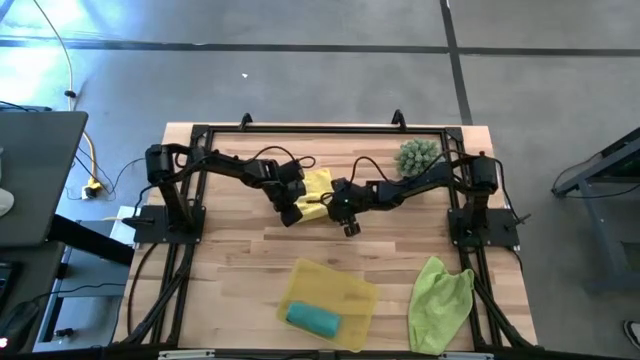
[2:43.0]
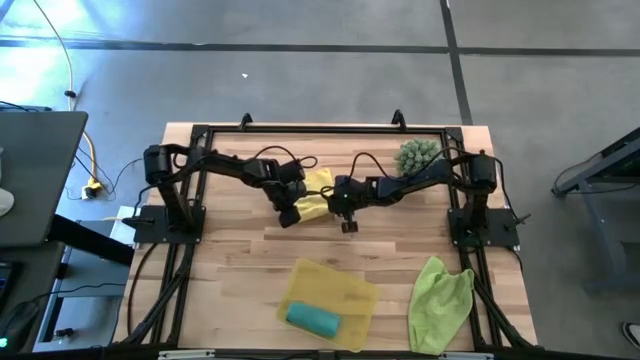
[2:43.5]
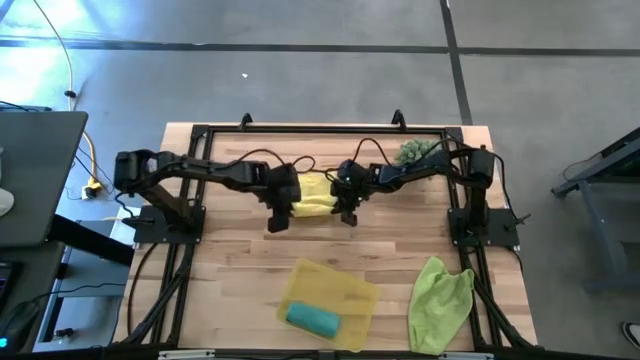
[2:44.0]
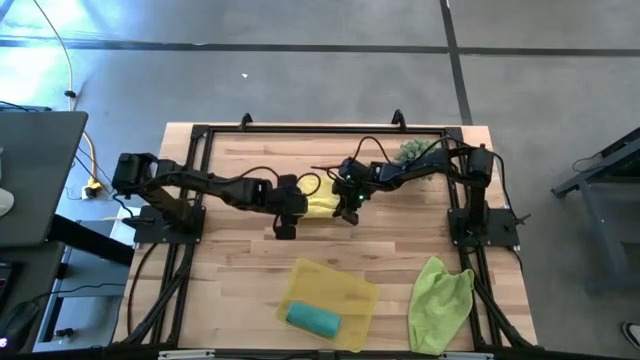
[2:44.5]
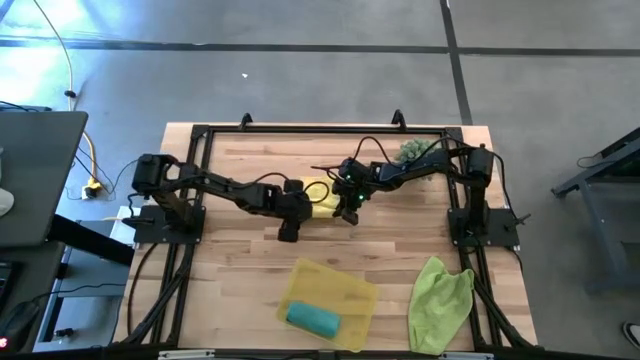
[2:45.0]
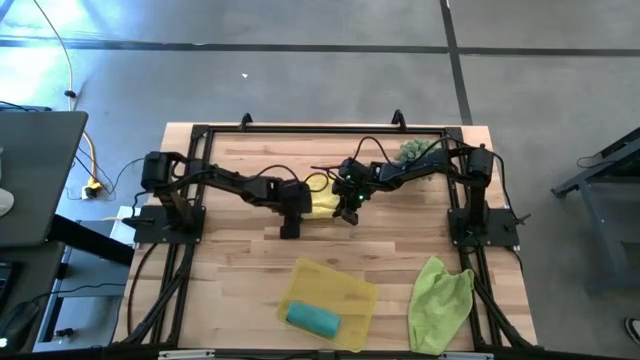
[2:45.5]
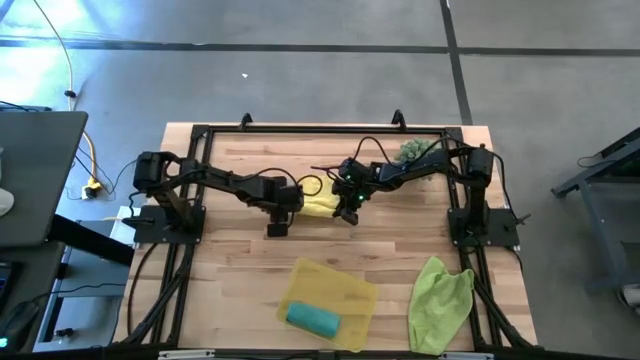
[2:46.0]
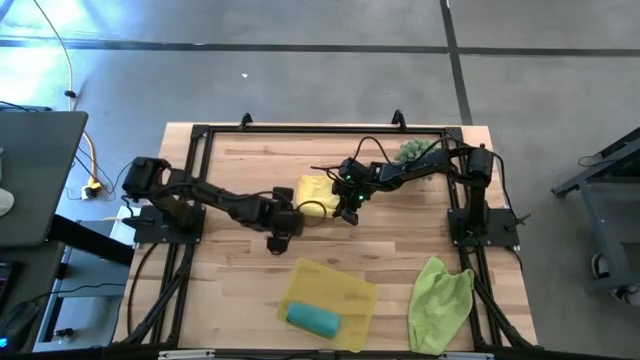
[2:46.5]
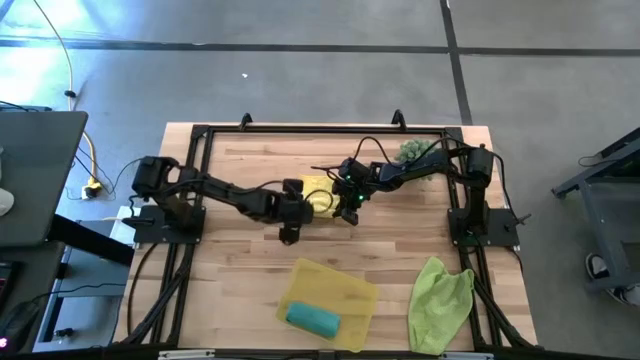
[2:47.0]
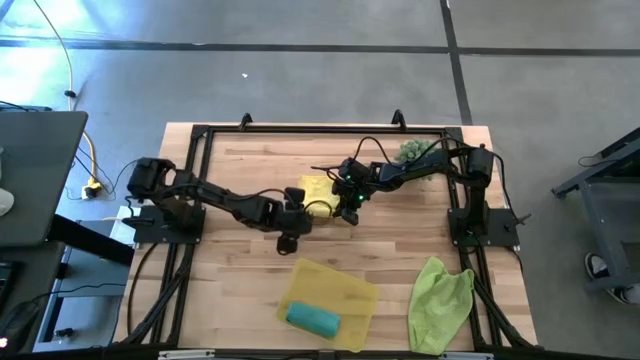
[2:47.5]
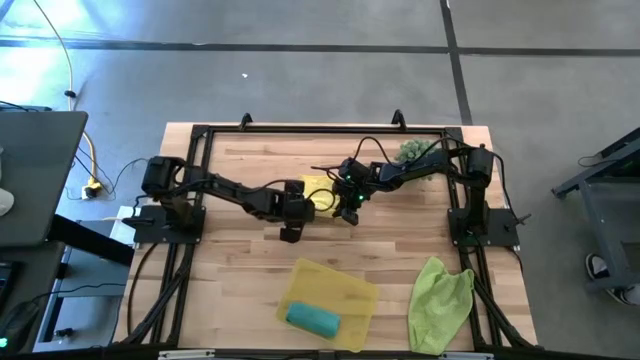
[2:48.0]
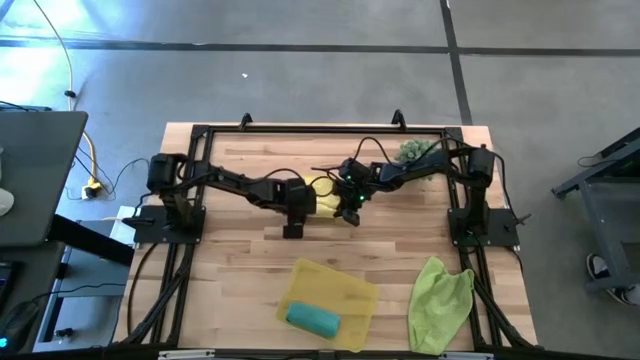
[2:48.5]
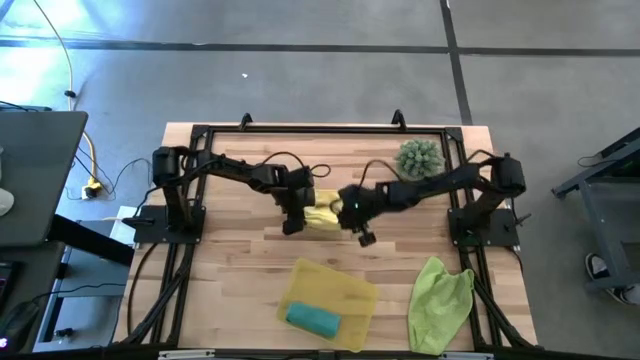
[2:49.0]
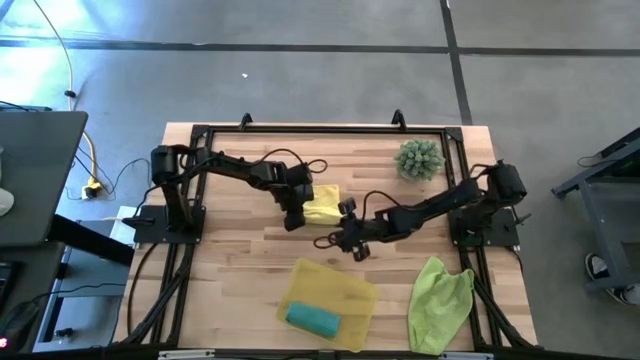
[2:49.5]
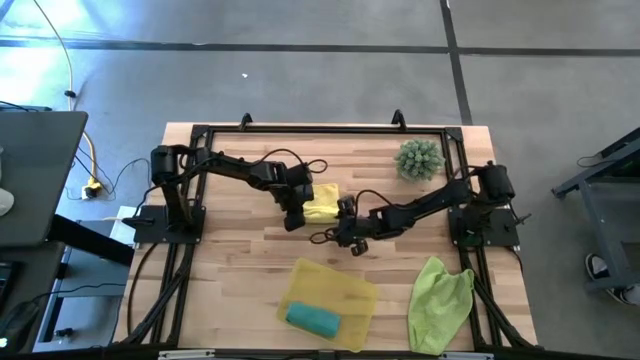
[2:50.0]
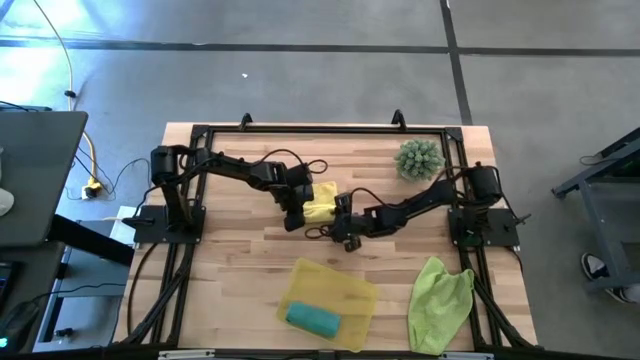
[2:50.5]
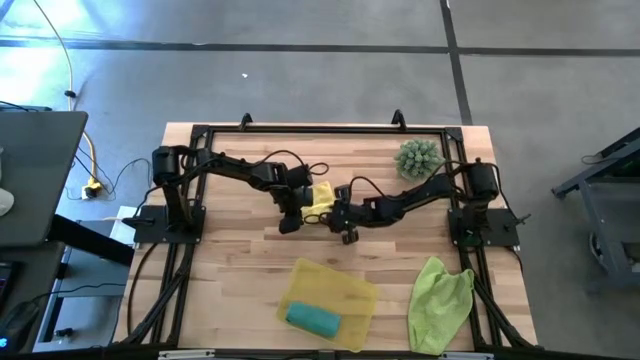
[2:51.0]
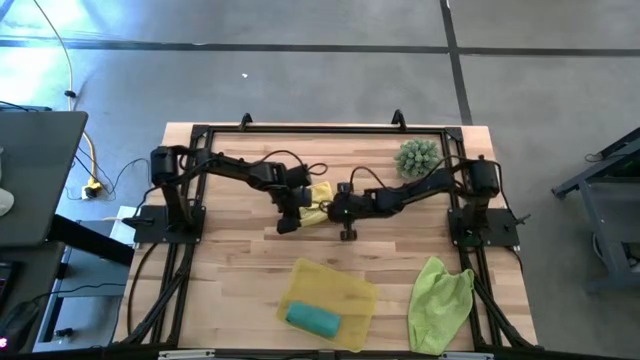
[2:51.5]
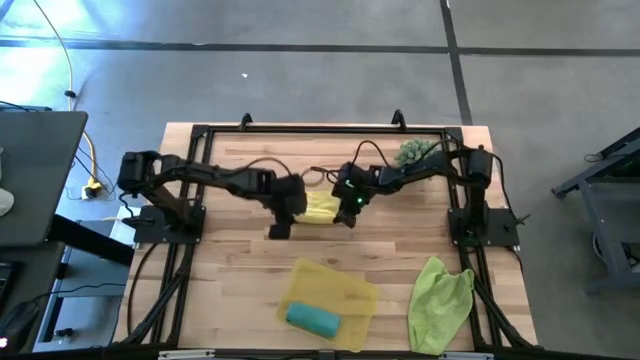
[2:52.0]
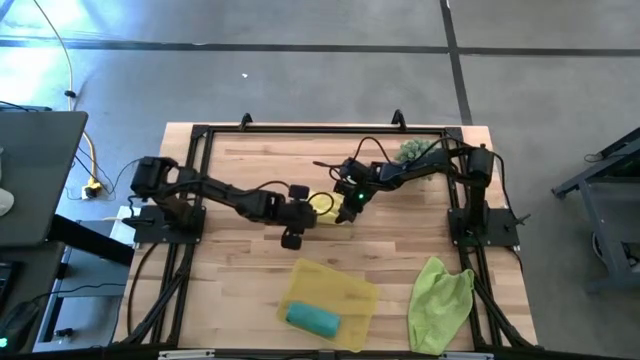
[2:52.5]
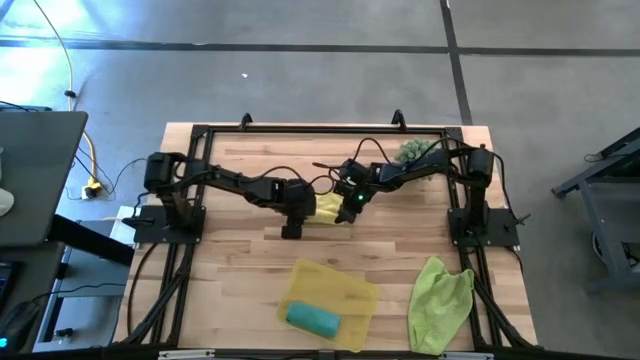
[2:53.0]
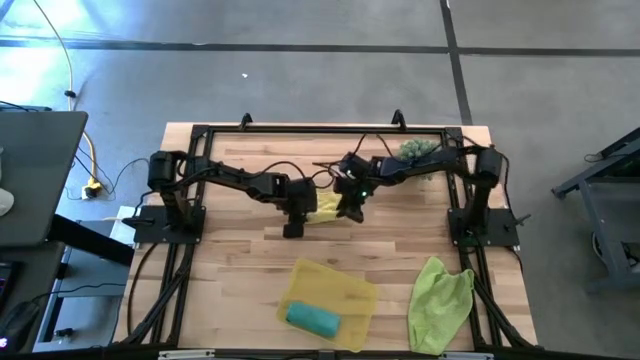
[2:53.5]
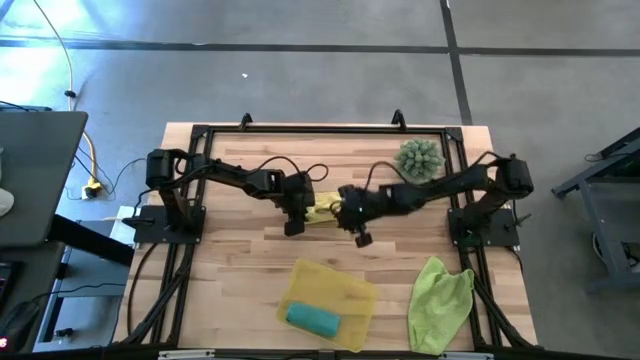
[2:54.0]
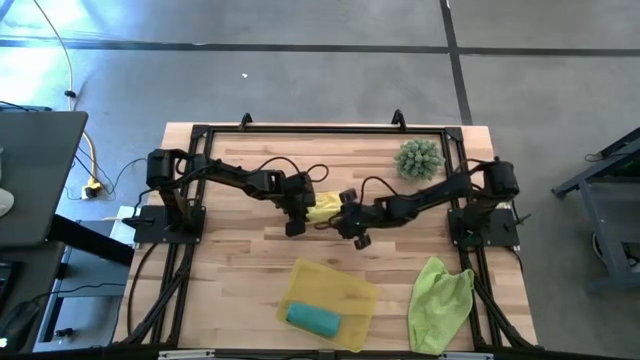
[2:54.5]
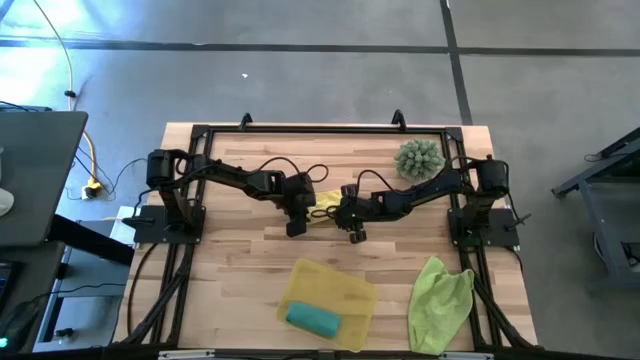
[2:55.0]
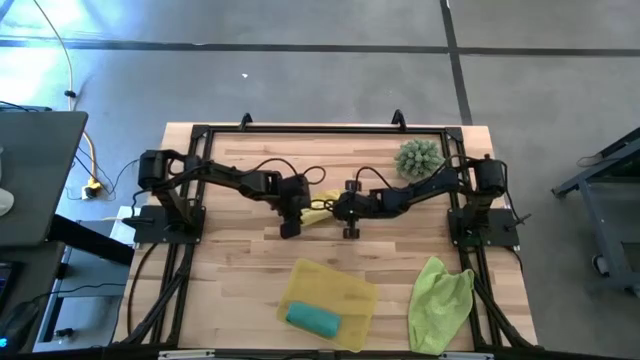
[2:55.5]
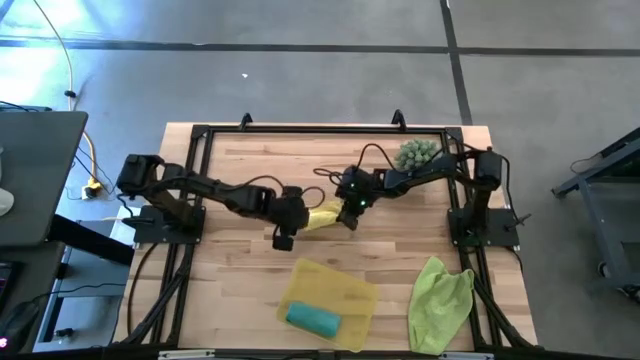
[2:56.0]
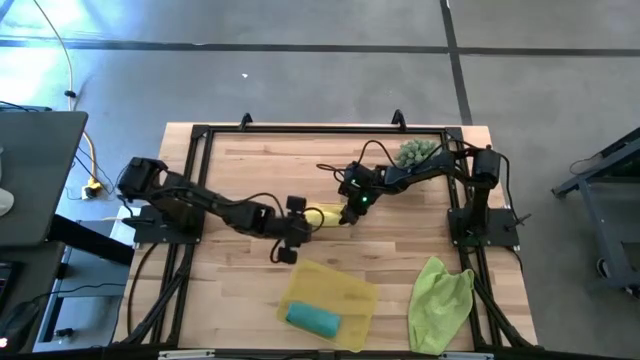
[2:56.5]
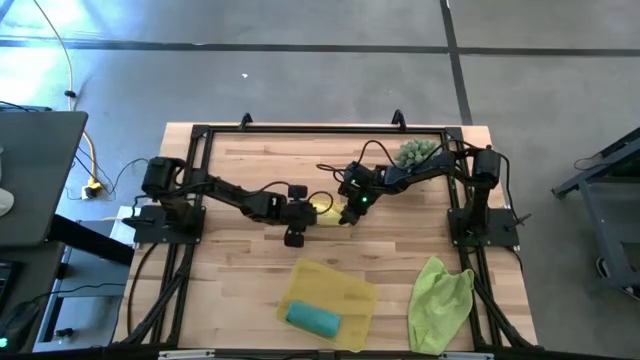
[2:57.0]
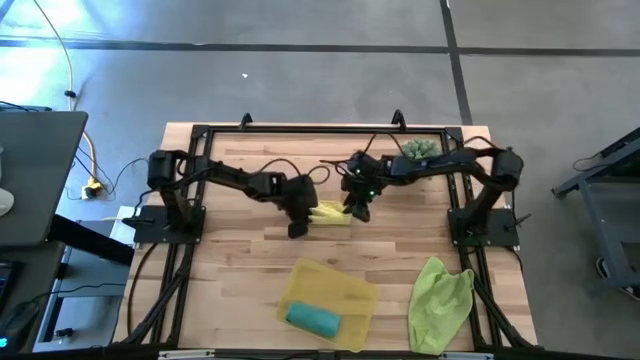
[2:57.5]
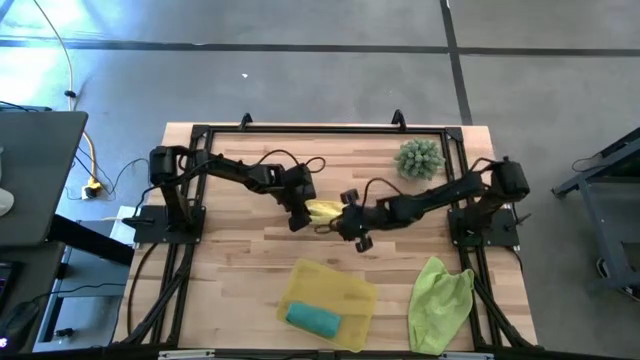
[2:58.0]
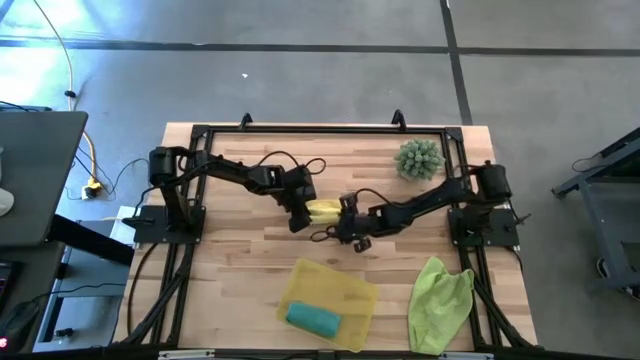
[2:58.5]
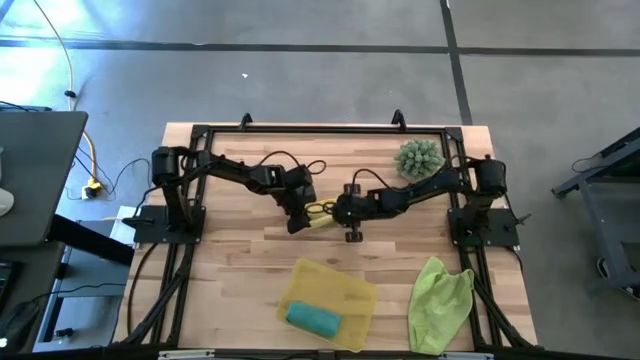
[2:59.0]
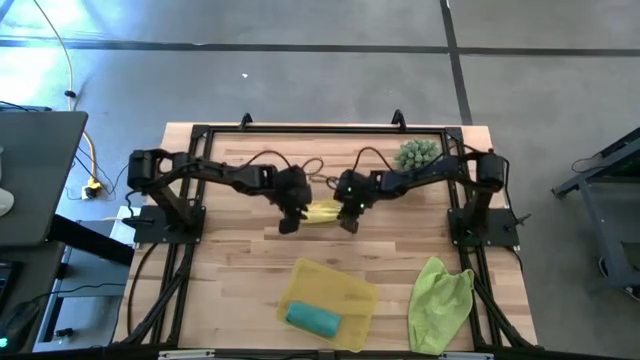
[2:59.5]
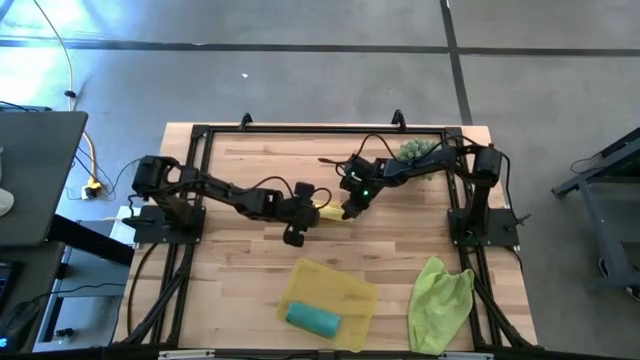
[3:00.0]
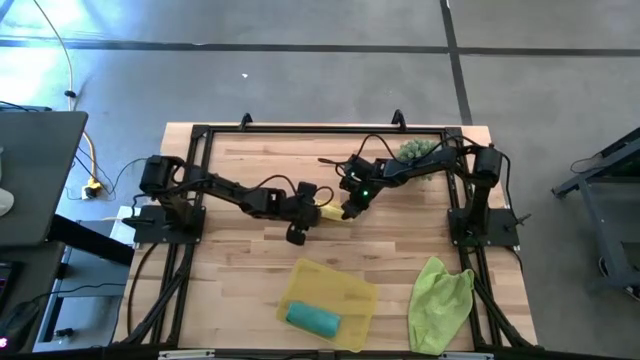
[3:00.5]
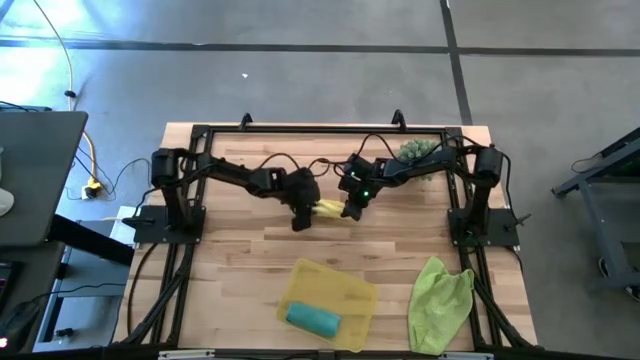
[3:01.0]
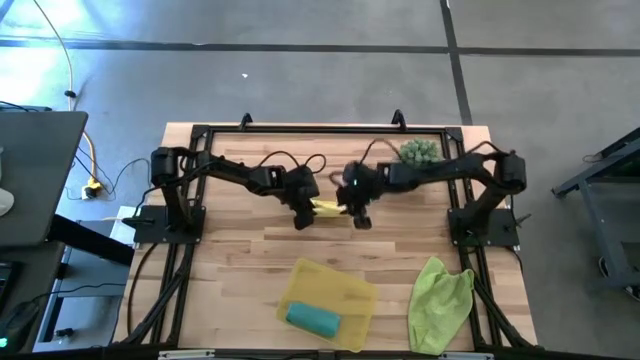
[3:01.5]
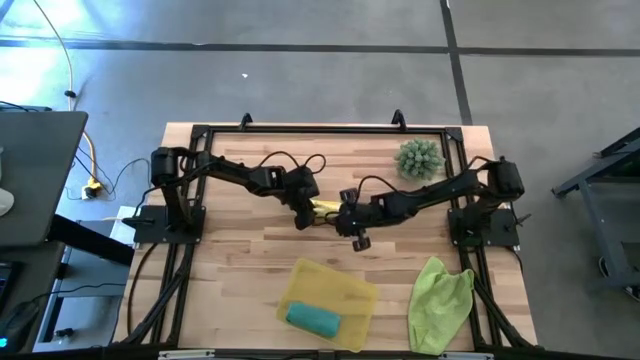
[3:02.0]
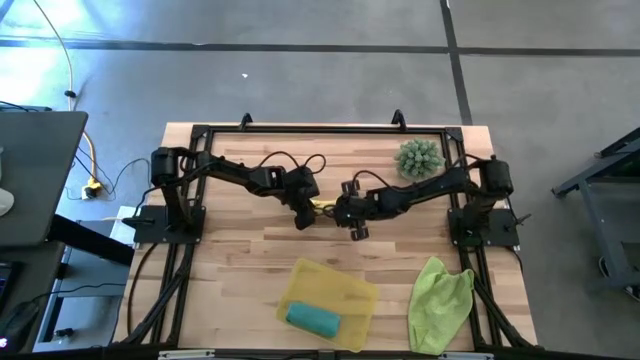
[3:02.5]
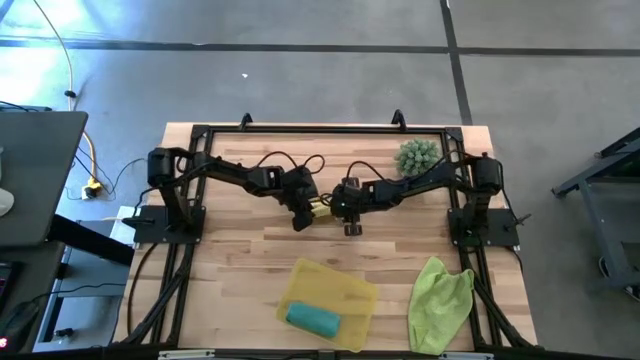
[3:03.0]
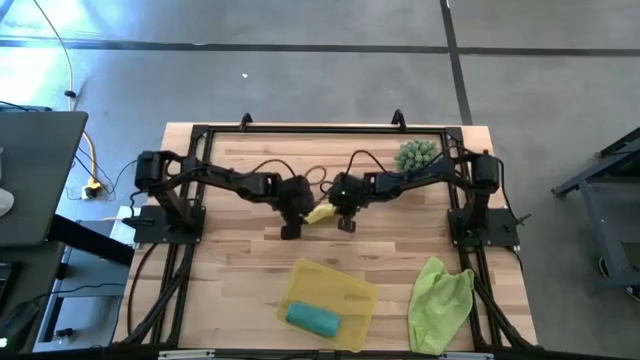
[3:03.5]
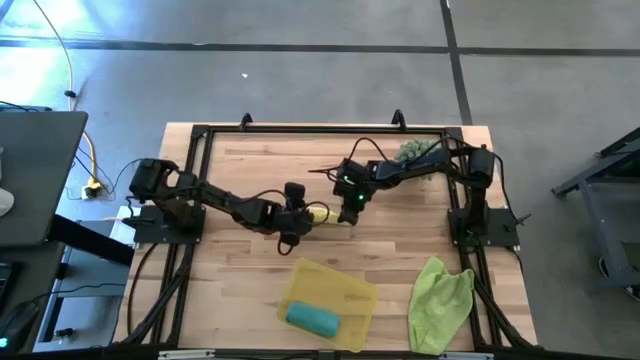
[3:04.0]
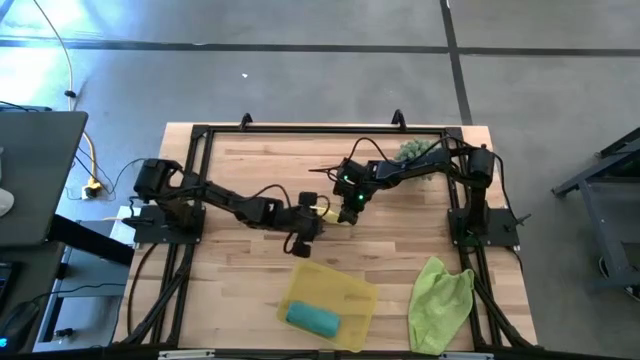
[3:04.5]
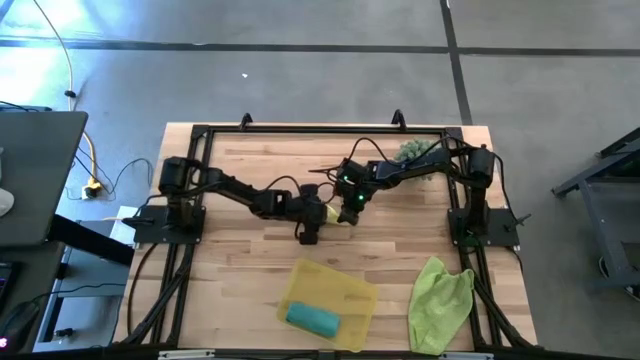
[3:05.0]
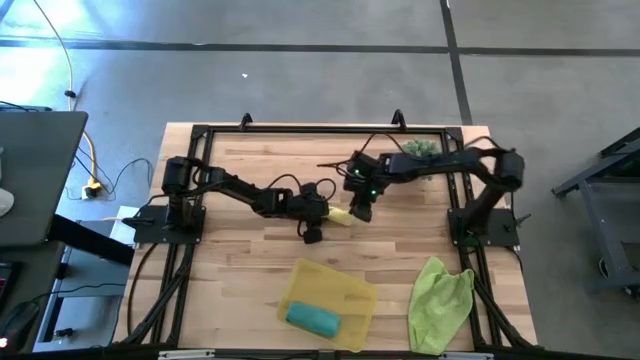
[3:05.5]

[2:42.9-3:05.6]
Task: Roll microfiber towels into tight, uniform cylinder then place into a basket
Roll the yellow towel
